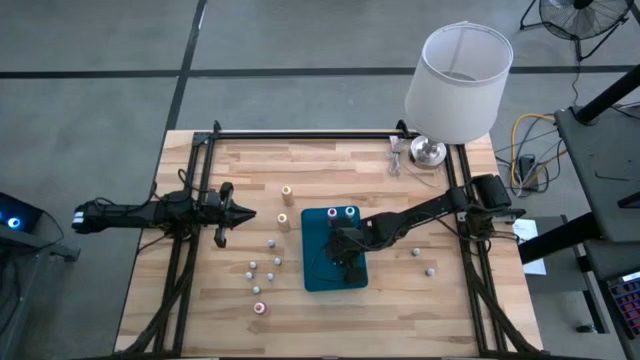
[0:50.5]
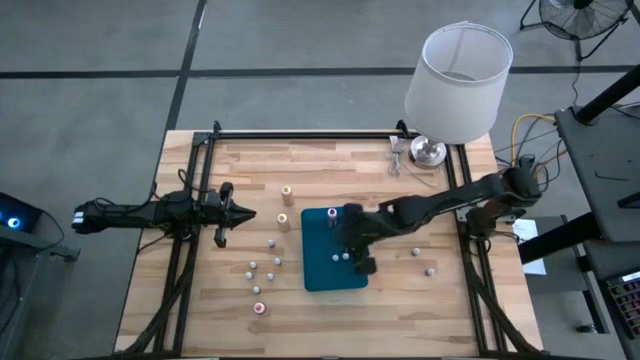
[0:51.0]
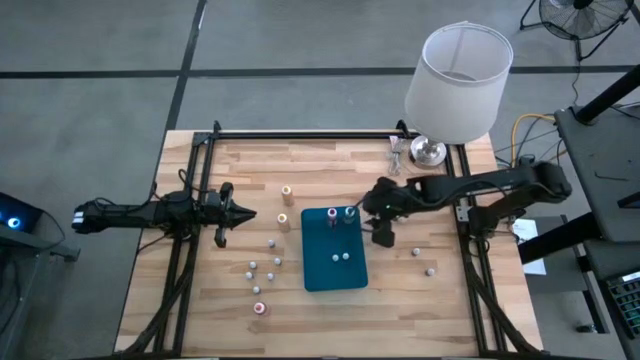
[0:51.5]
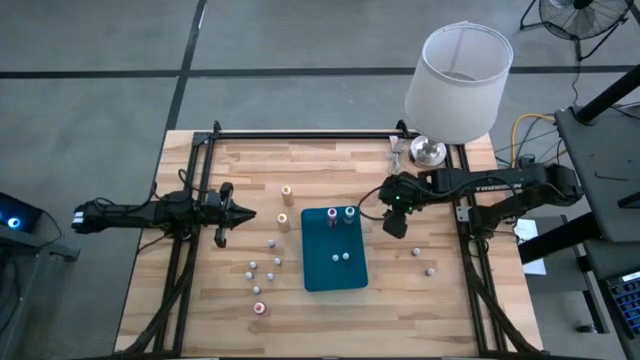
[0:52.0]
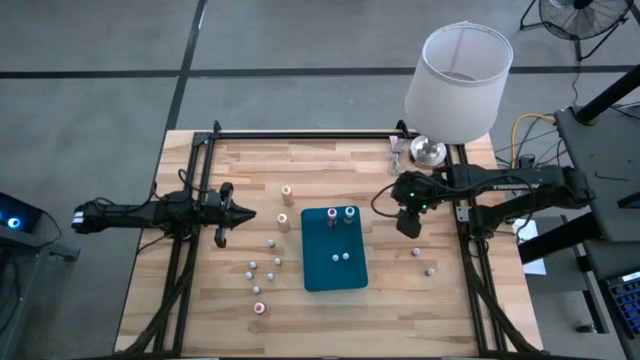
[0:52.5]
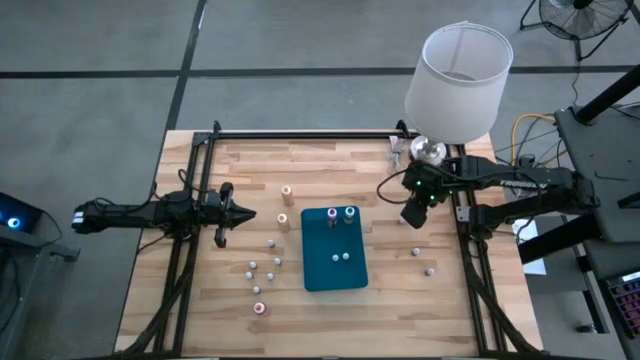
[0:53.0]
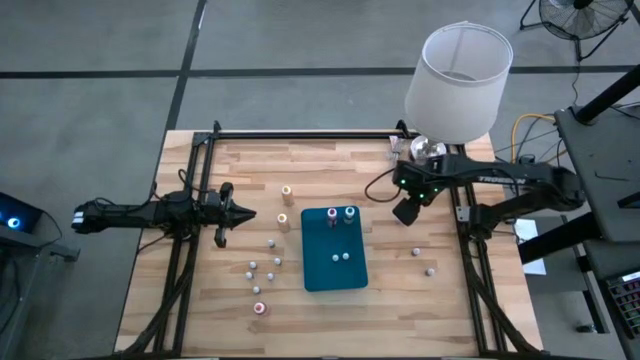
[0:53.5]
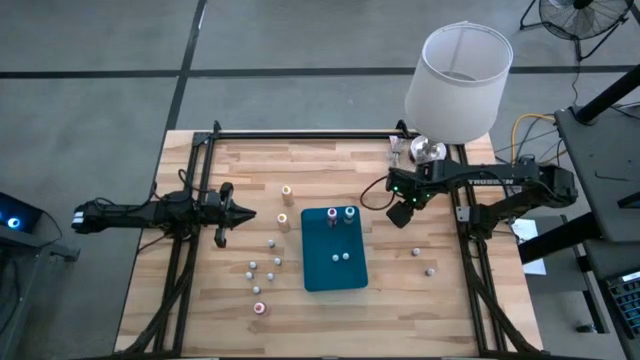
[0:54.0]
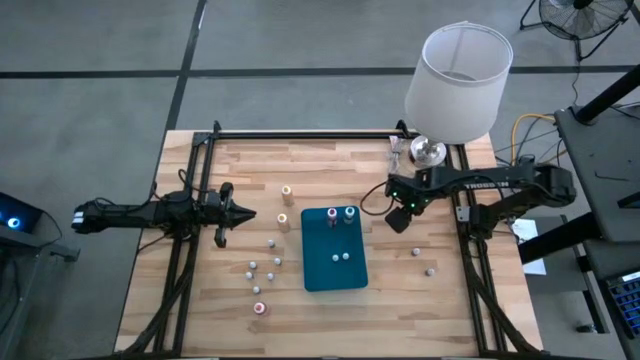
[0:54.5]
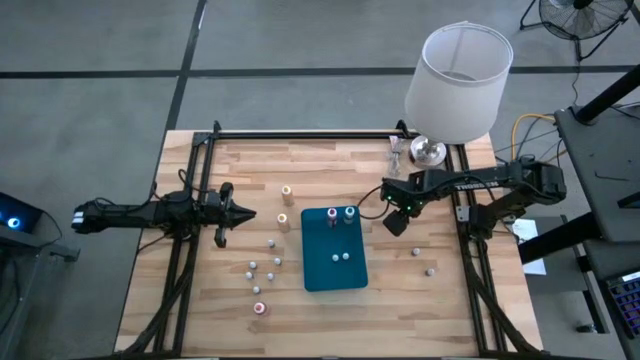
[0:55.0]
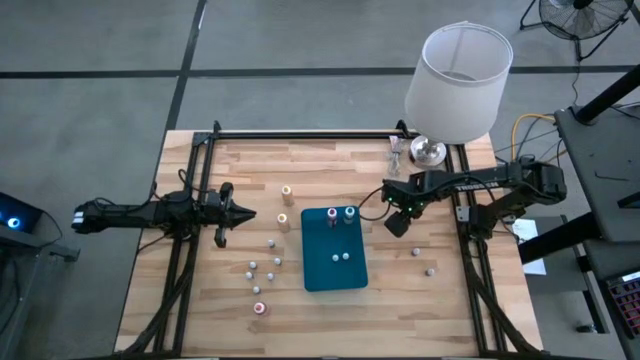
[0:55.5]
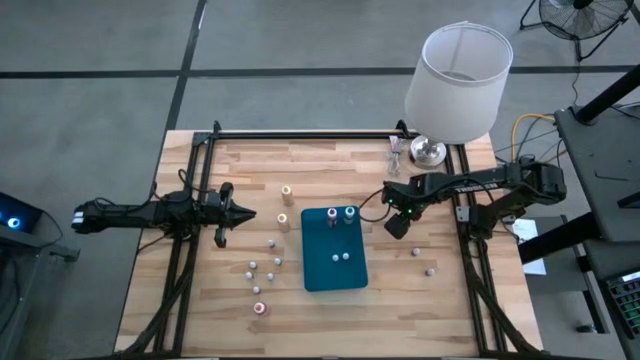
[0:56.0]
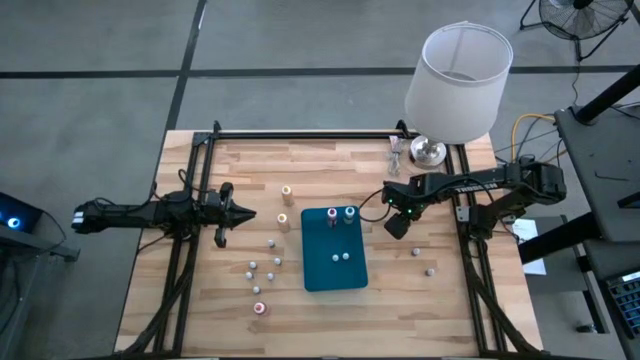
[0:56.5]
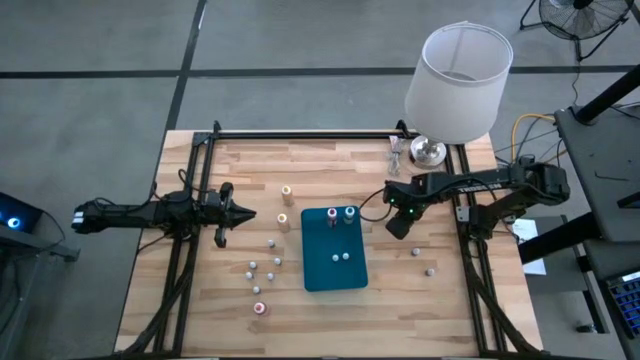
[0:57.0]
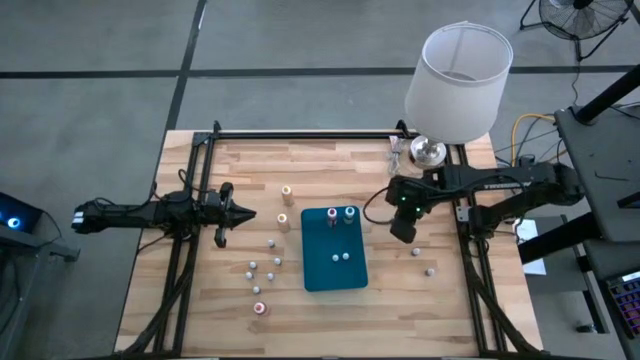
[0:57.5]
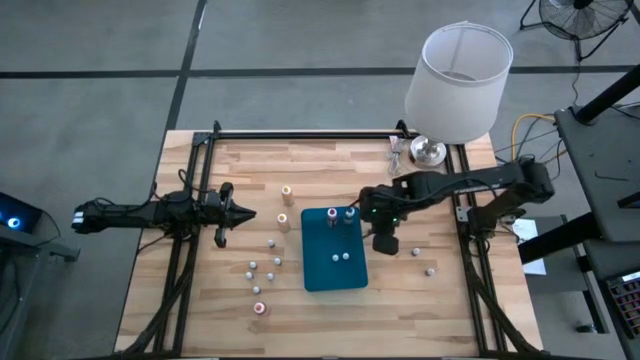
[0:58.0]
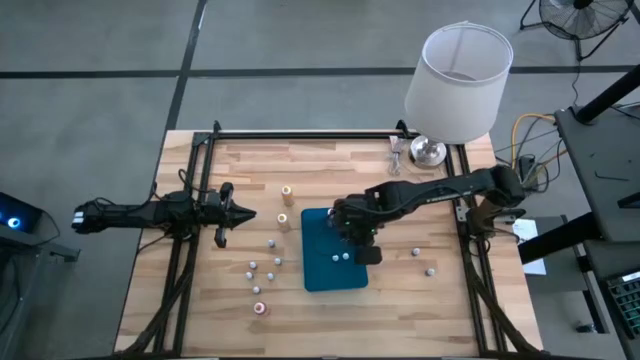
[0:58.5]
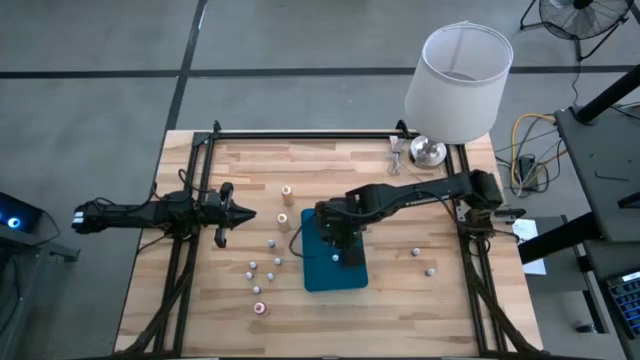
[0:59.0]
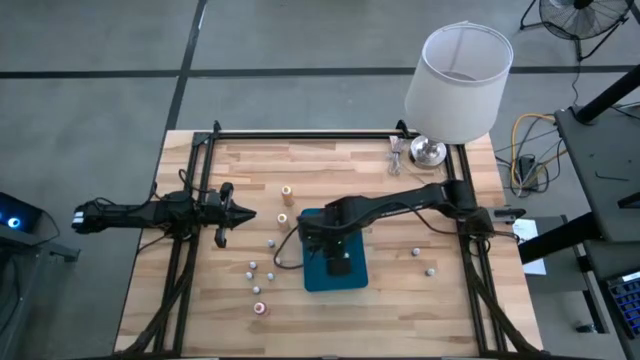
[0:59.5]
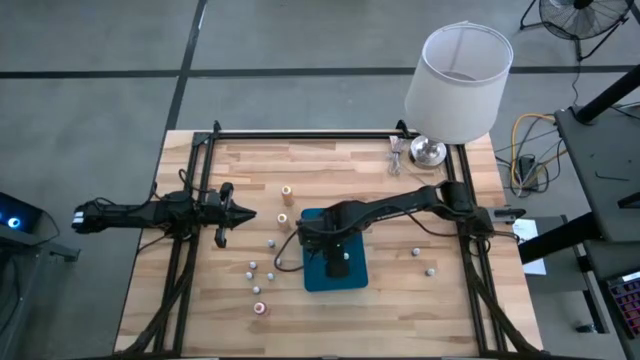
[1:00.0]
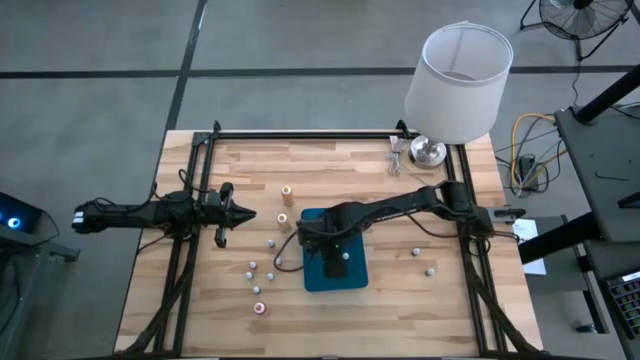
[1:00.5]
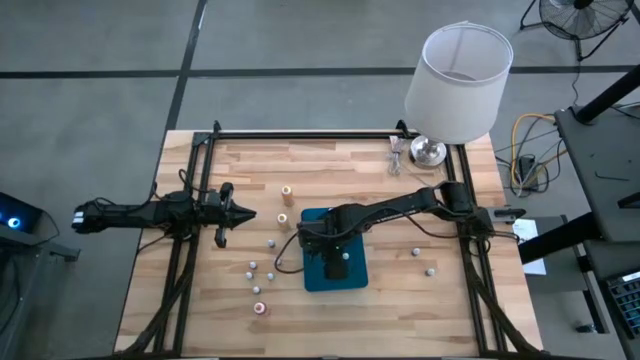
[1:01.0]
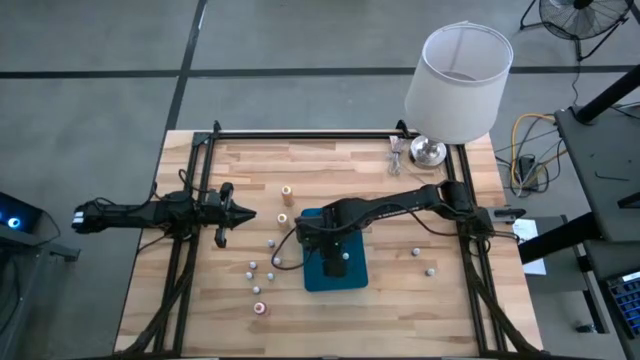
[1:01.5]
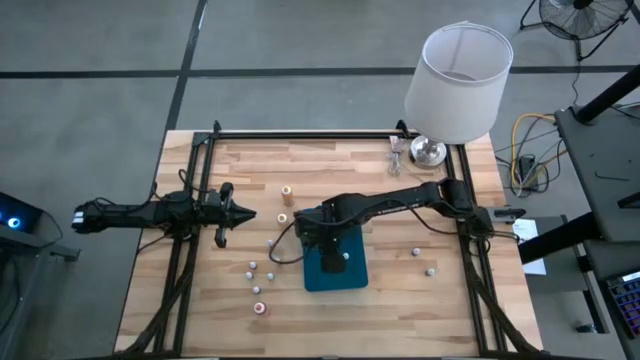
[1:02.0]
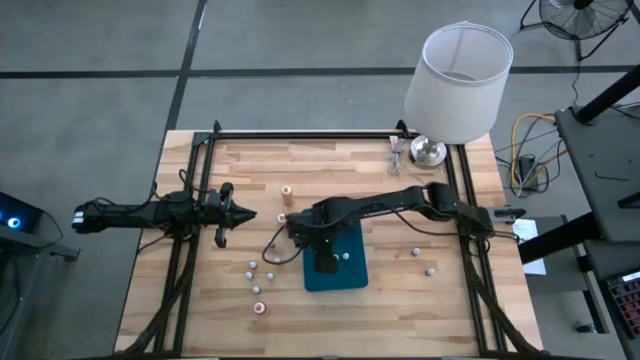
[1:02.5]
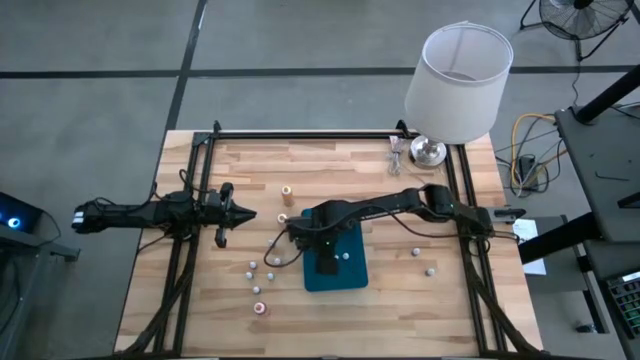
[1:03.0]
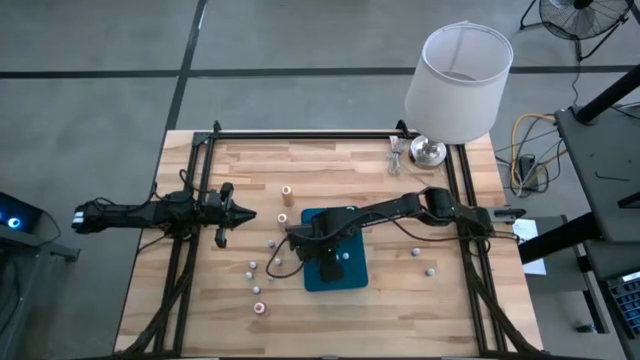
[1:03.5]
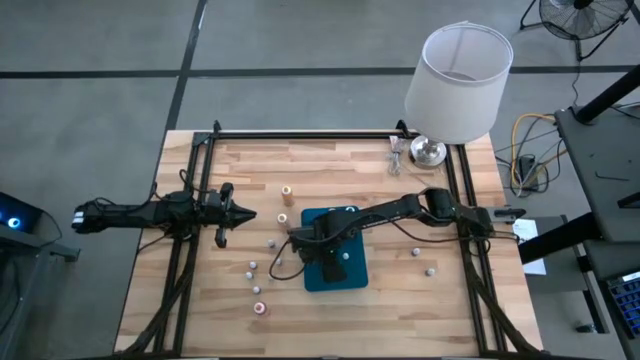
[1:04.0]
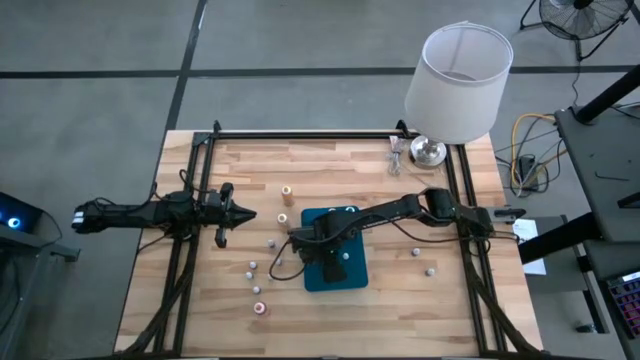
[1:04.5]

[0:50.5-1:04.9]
Task: Pick & Place food coloring
Put the small pink food coloring bottle into the blue bin
